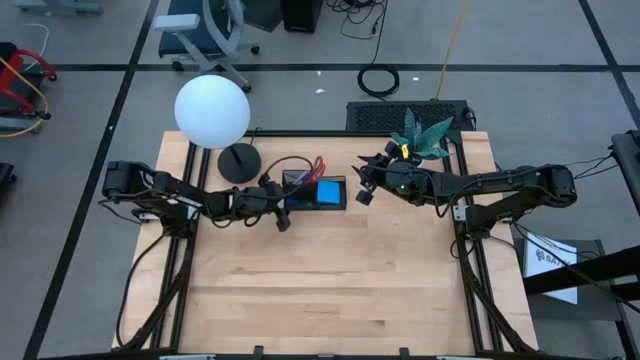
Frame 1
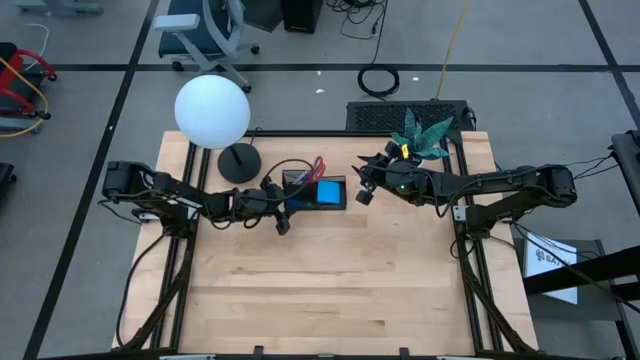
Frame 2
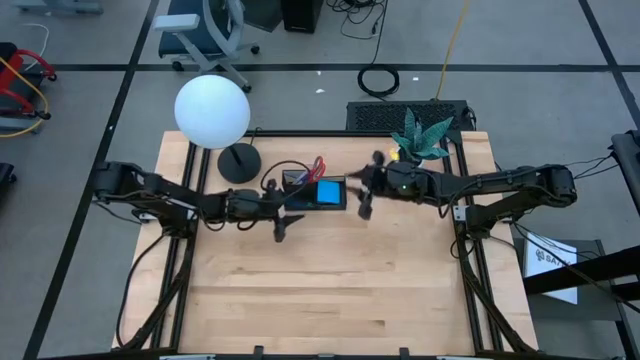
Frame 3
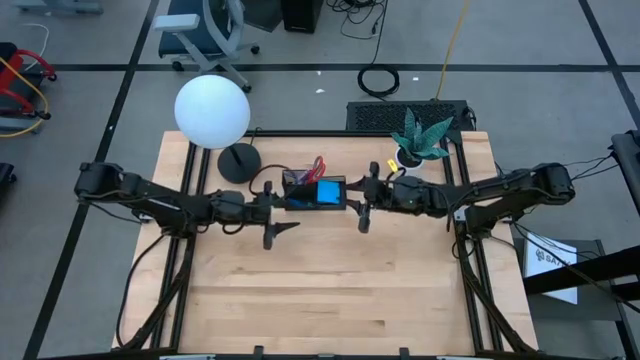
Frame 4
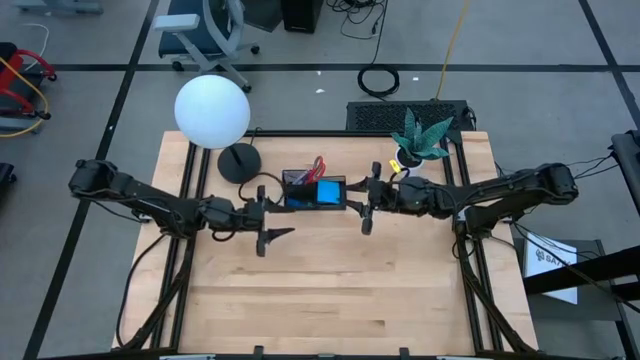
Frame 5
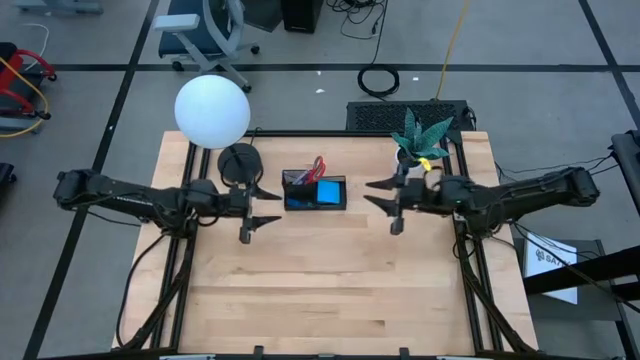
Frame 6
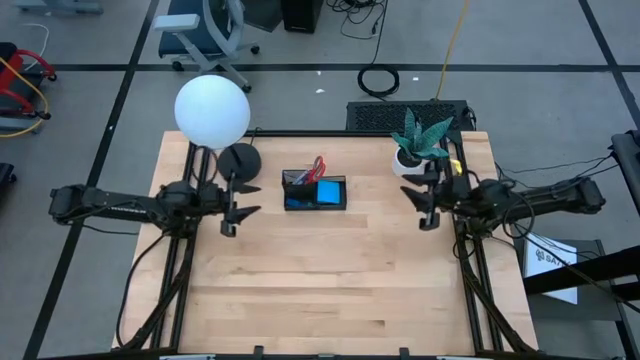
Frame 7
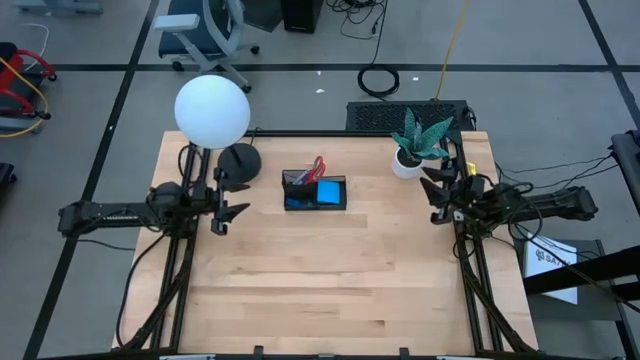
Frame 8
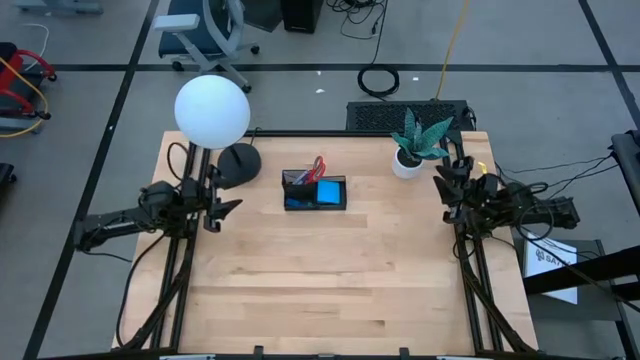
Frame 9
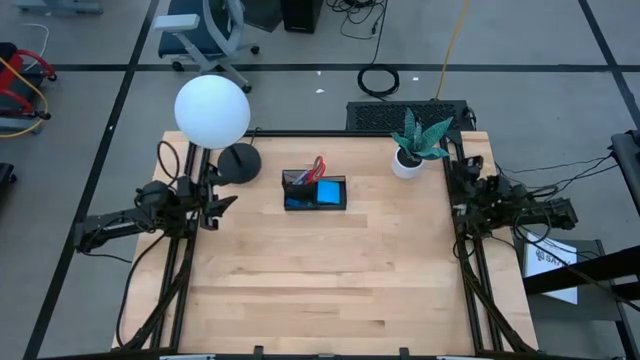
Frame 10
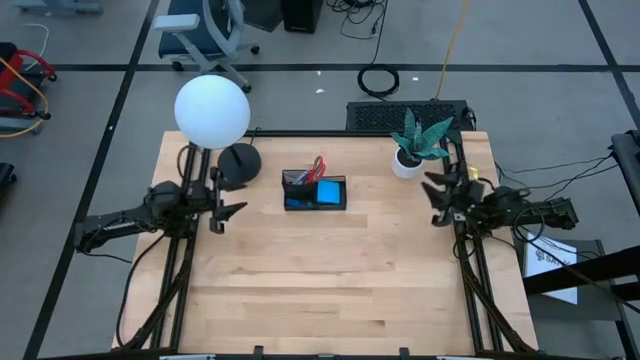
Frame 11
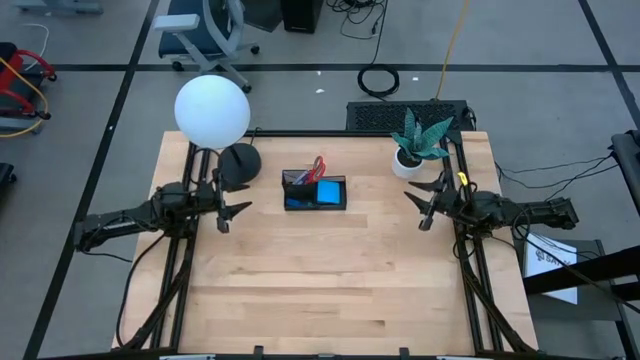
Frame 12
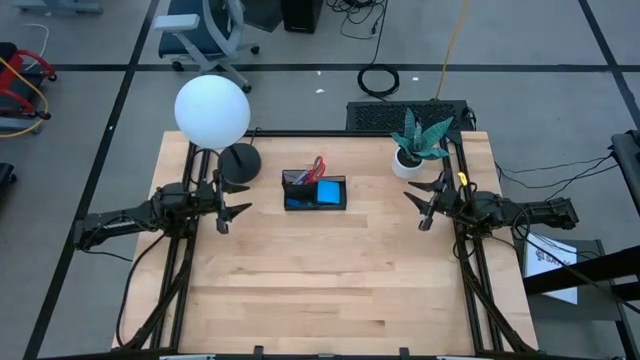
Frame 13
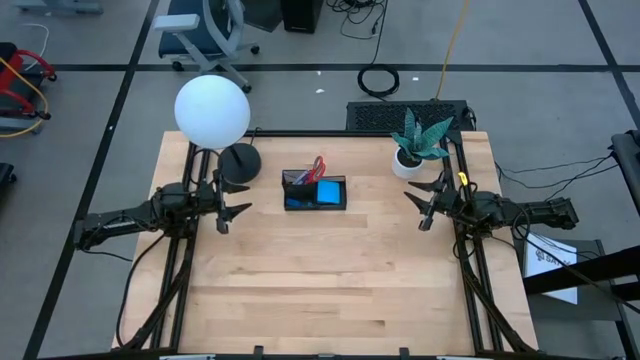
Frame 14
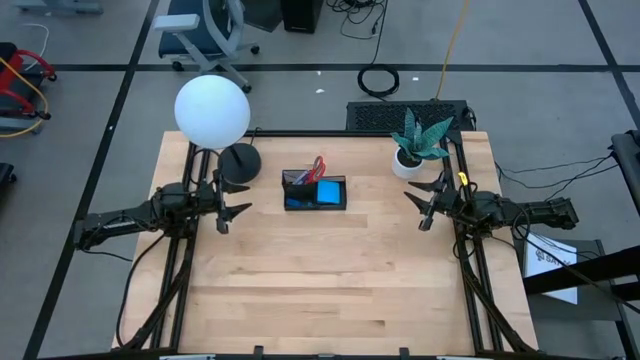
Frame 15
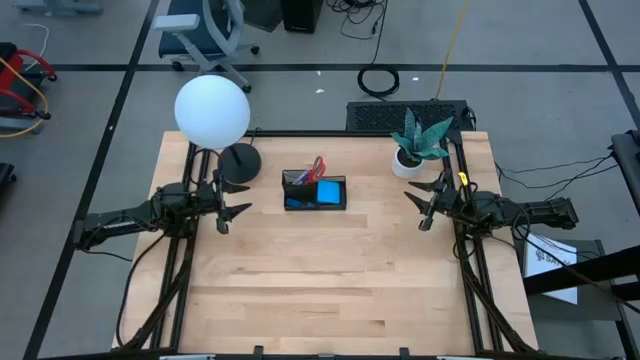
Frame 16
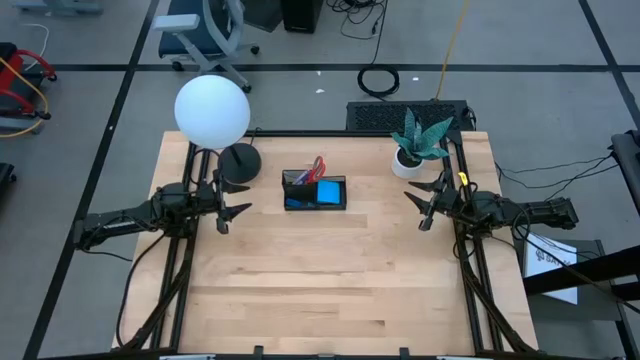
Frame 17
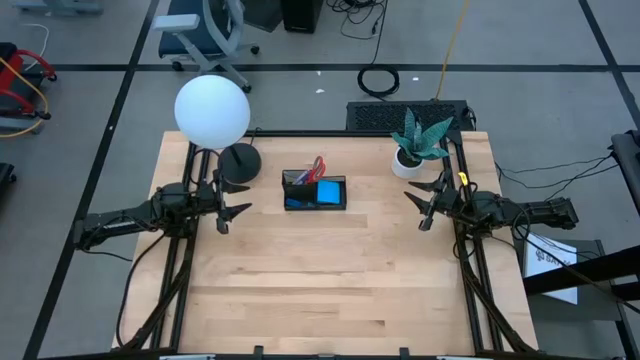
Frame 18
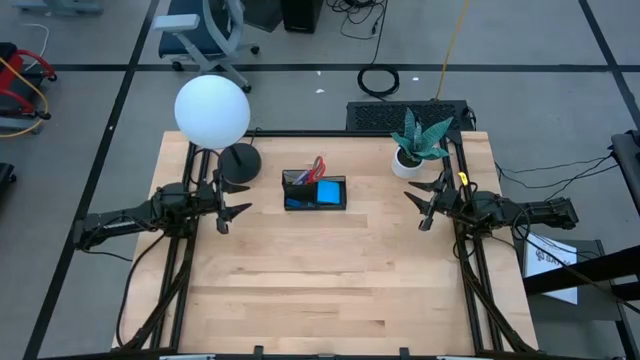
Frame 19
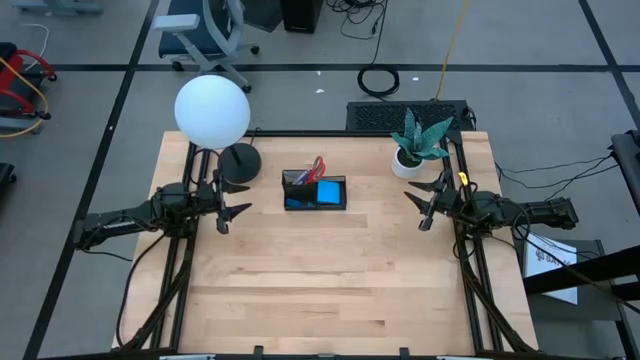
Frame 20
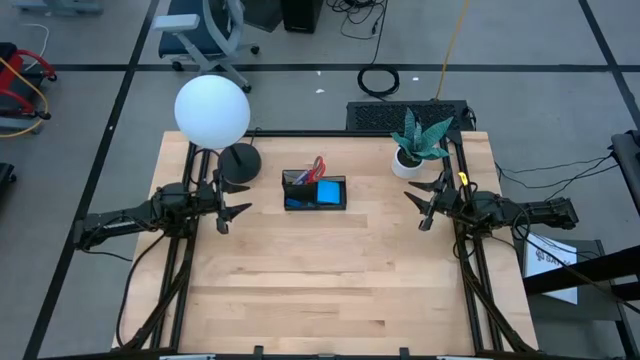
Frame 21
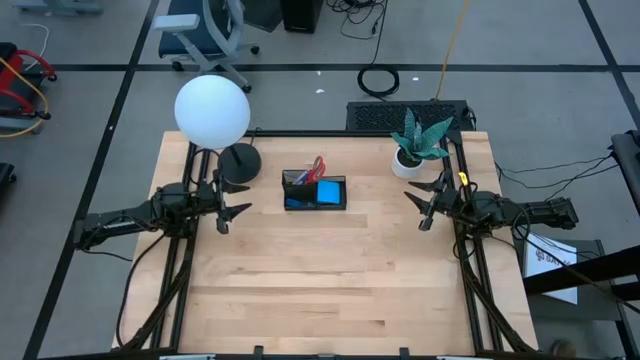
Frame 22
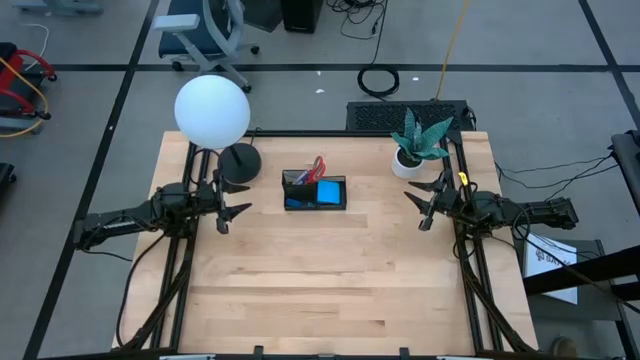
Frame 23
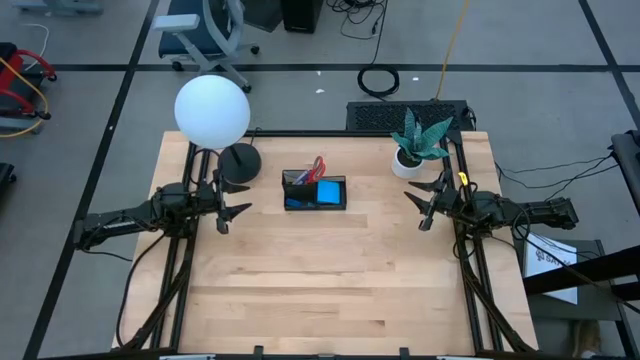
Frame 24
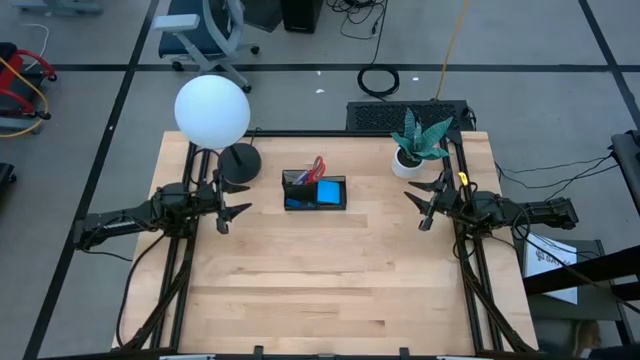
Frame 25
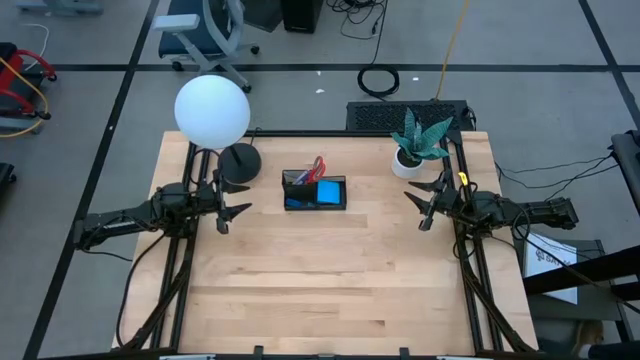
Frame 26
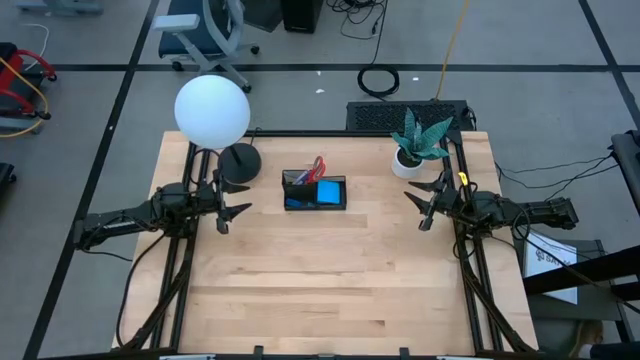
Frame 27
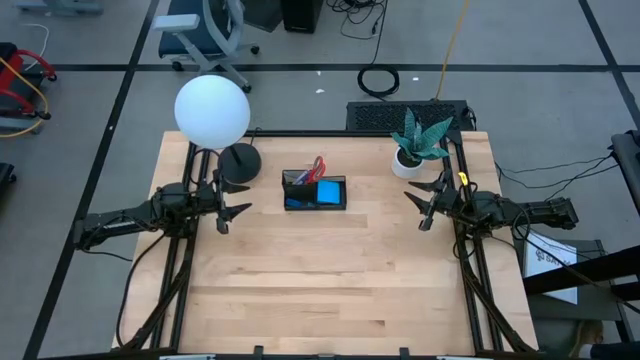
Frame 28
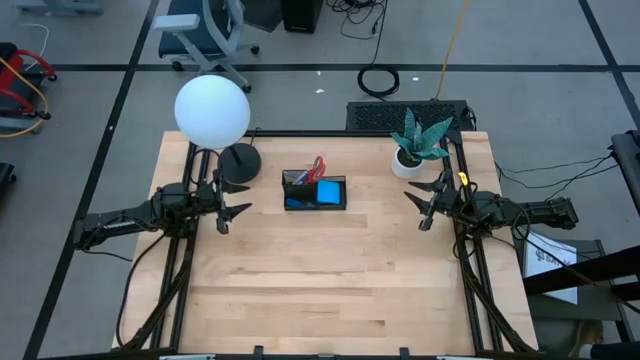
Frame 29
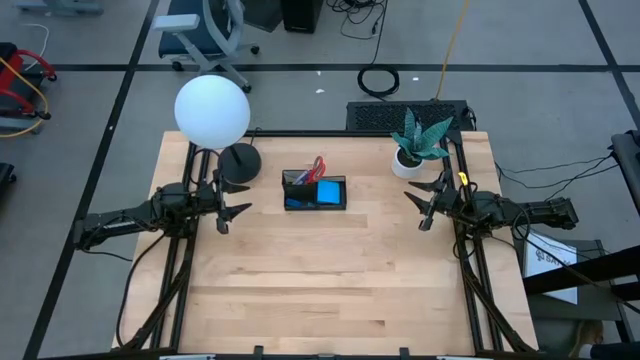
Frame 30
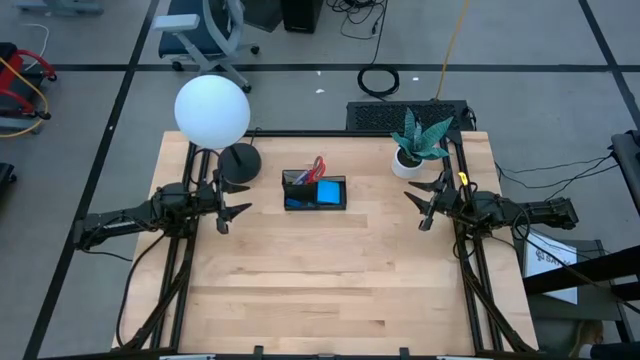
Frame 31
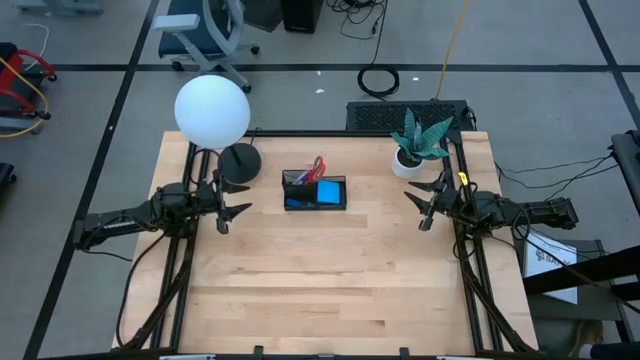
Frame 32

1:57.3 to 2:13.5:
Task: Pick and place office supplies into organizer
Return to Home Position
